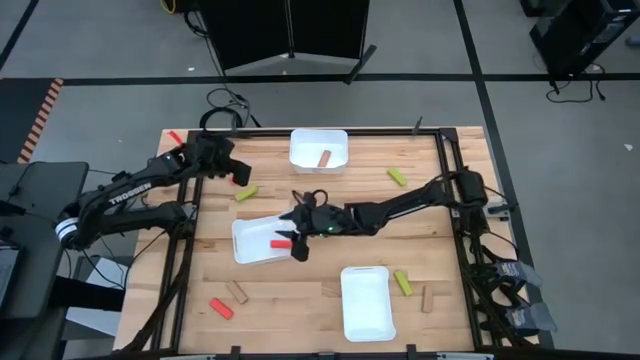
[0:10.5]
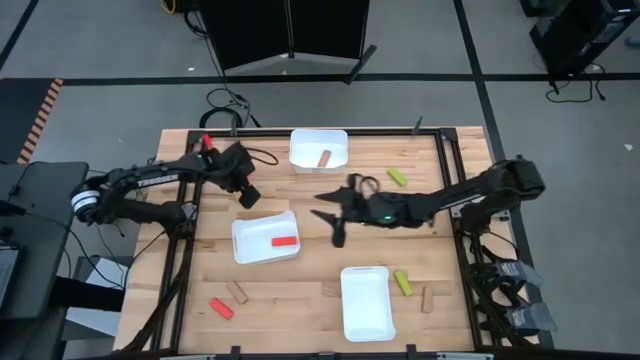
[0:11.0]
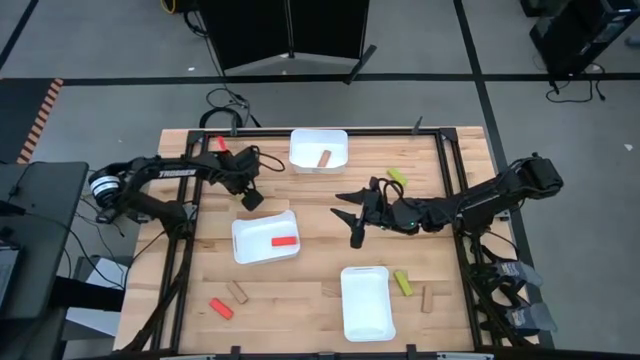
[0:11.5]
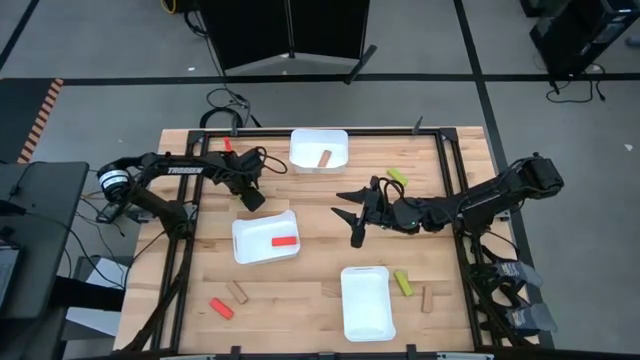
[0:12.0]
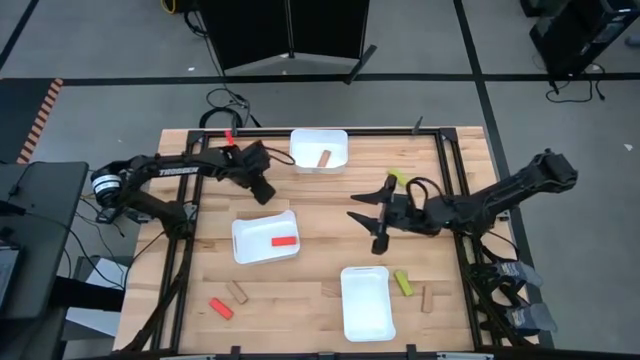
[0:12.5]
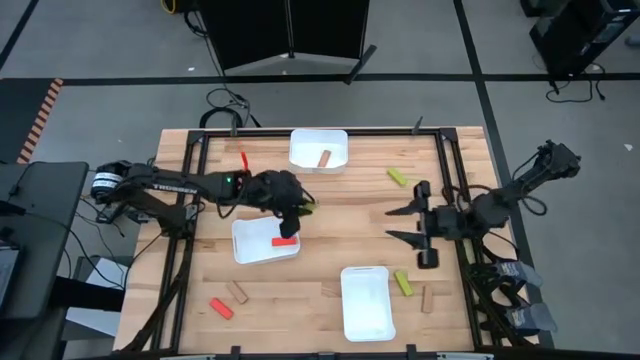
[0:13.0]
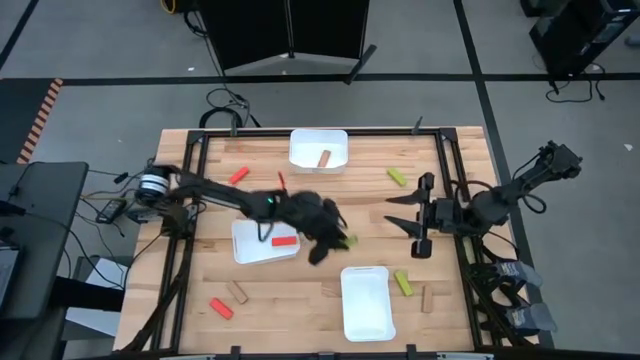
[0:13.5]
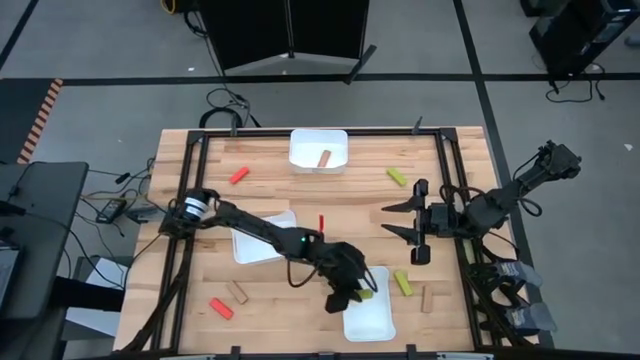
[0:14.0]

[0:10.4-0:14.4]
Task: Sort blocks
Put the top left yellow green block into the bottom white bin

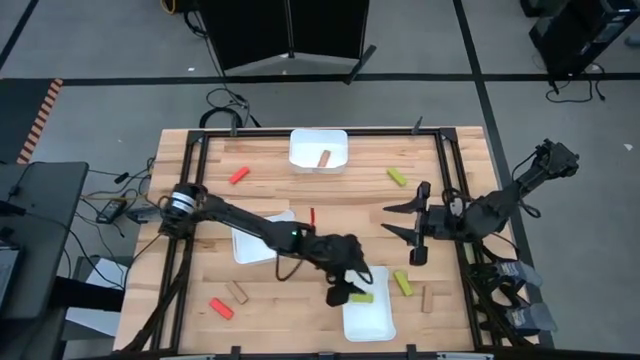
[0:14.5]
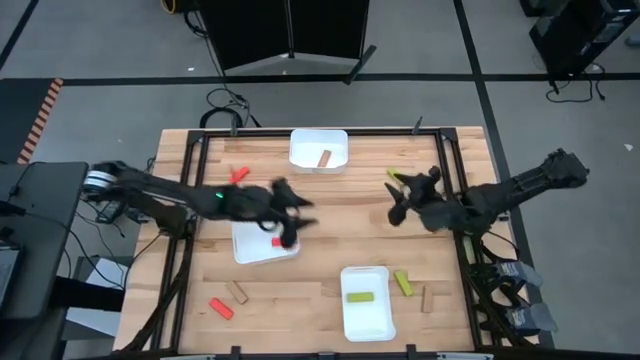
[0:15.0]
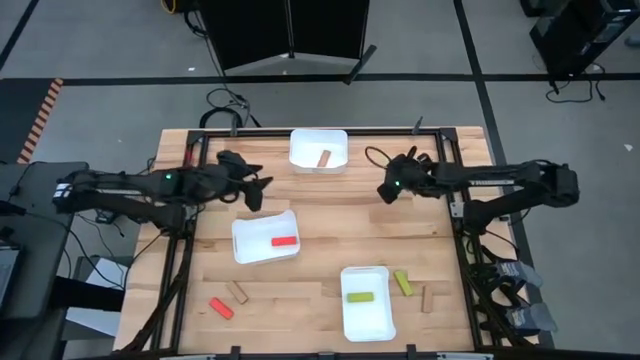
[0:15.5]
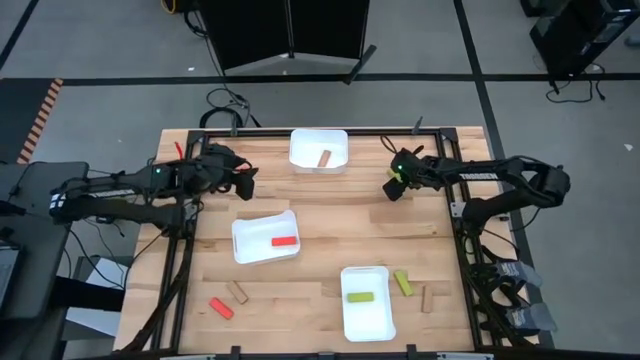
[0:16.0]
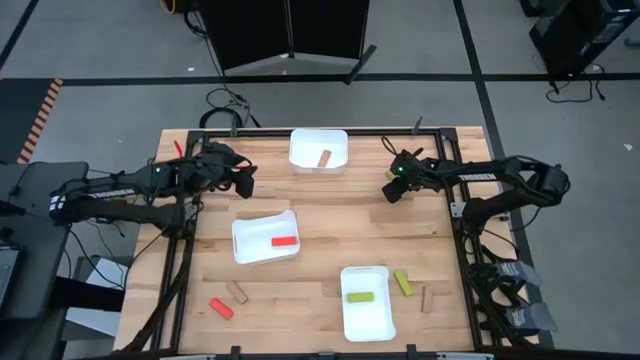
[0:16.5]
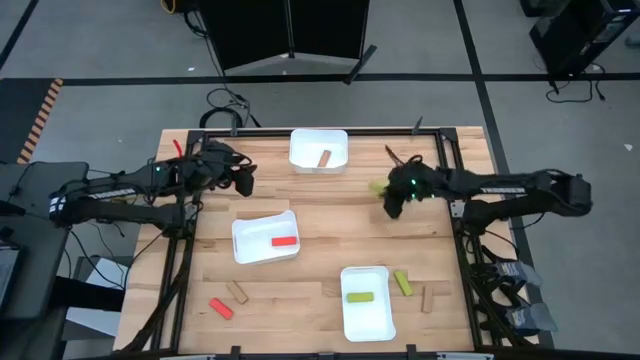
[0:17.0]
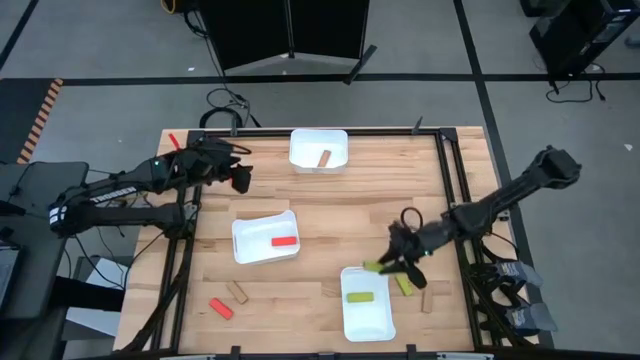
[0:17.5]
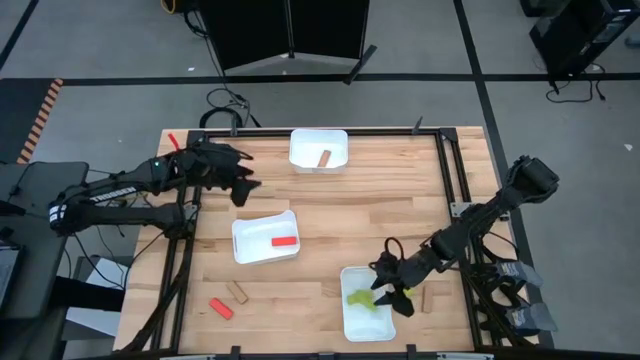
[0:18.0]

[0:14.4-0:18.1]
Put the top yellow green block into the bottom white bin

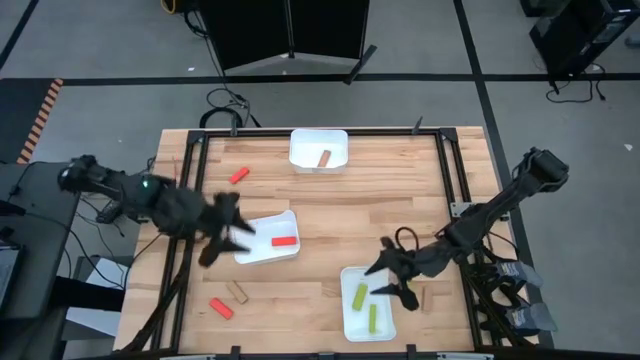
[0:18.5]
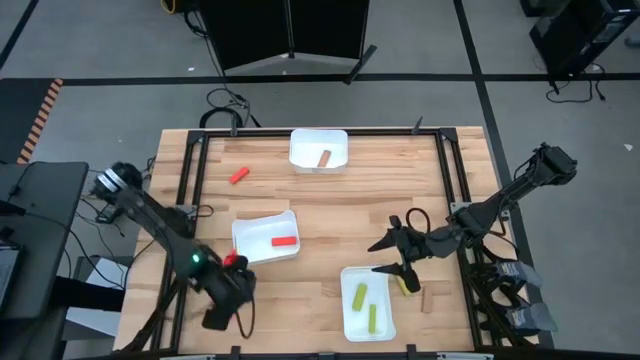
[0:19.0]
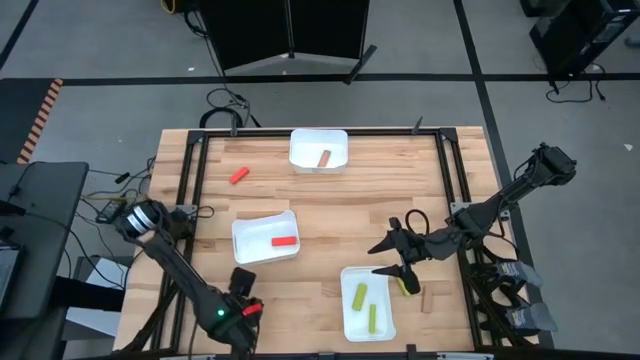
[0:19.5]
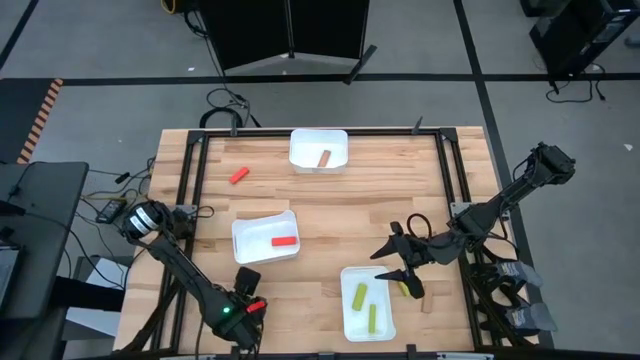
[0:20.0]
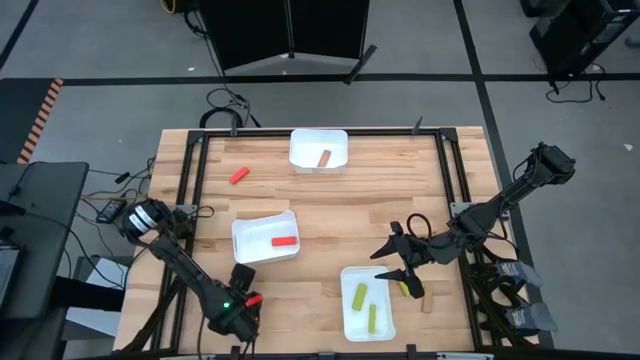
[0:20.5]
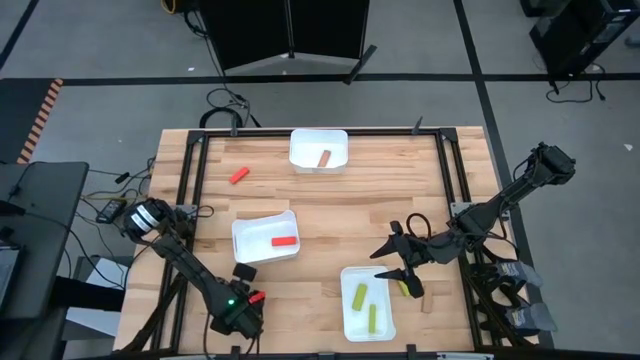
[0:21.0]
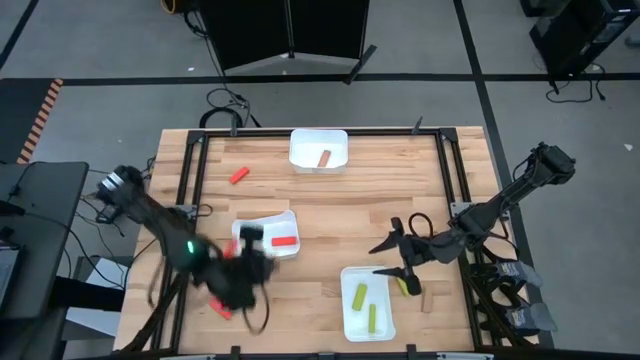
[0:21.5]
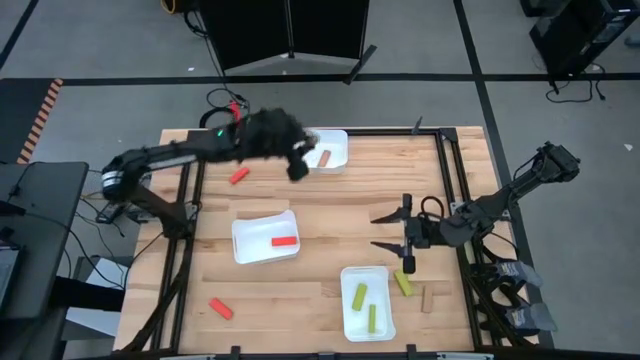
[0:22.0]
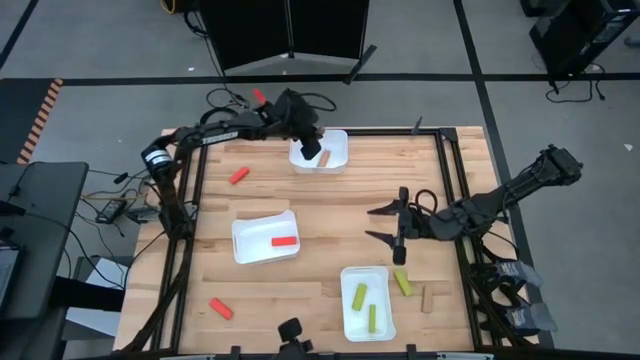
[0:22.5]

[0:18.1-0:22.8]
Put the left light brown block into the top white bin

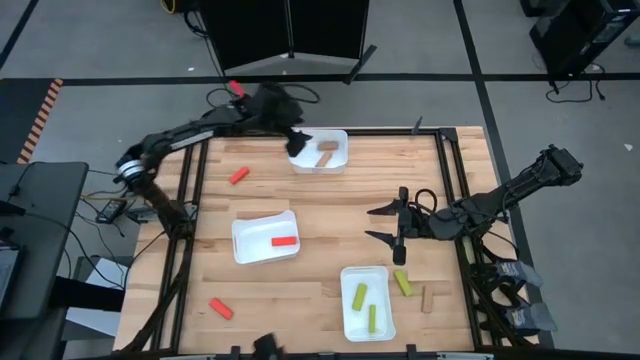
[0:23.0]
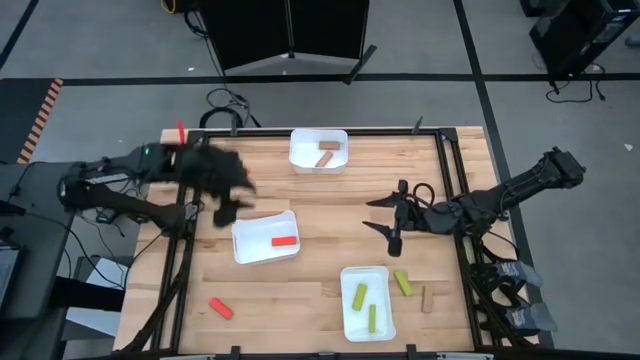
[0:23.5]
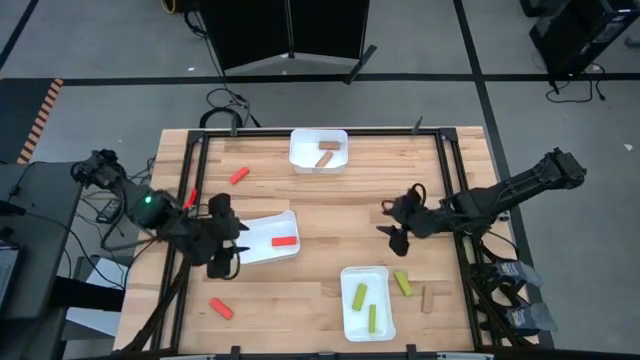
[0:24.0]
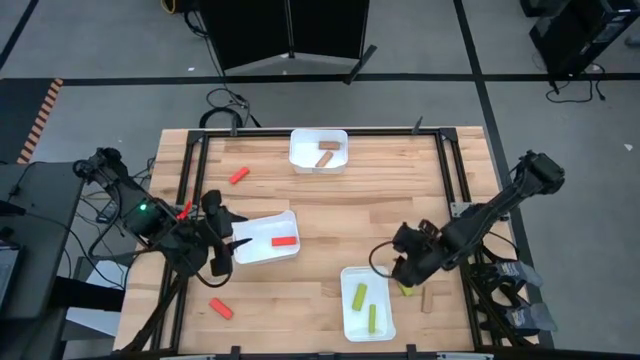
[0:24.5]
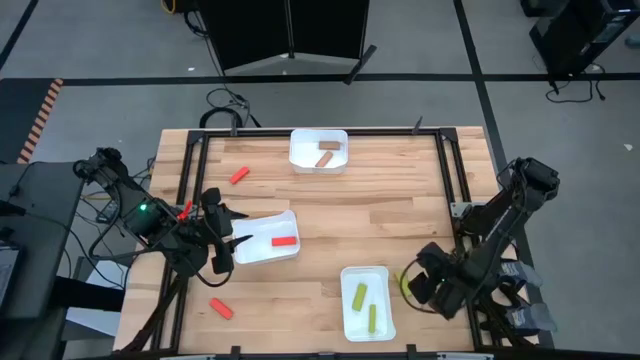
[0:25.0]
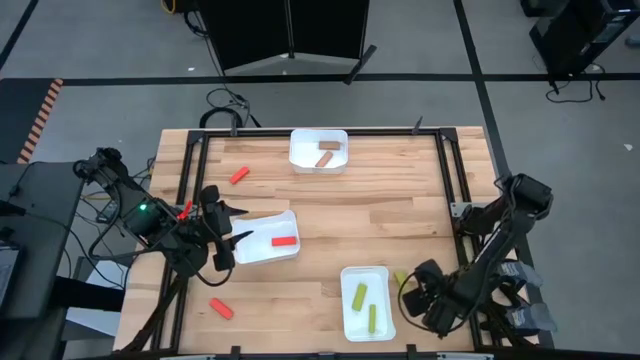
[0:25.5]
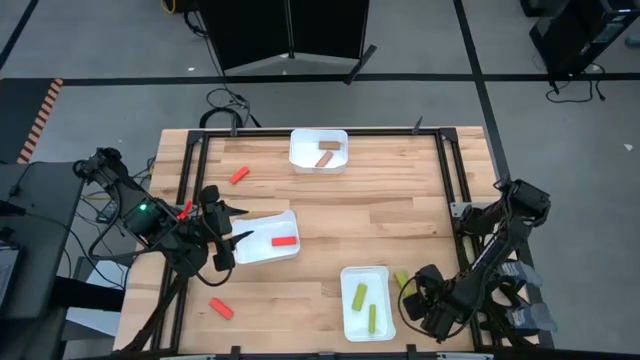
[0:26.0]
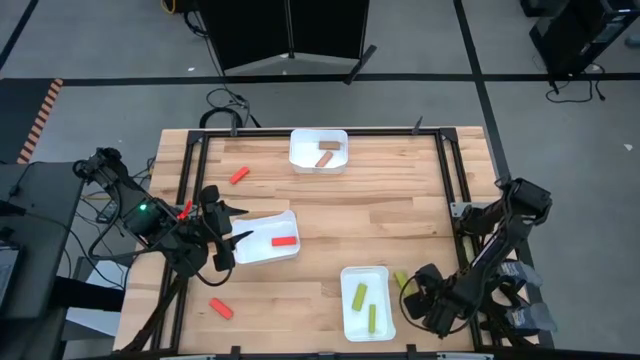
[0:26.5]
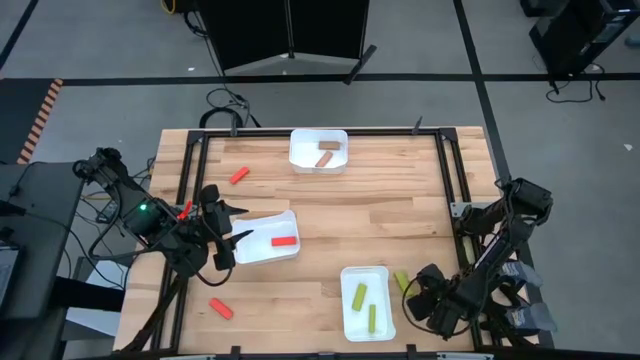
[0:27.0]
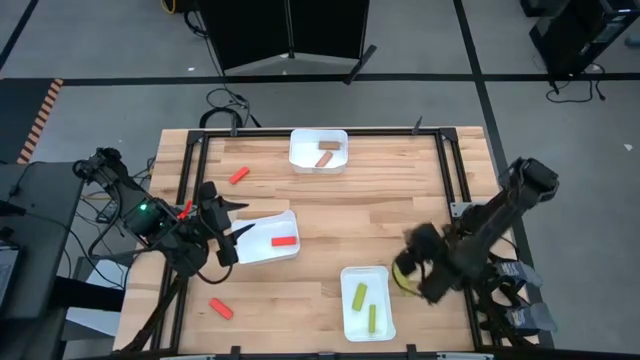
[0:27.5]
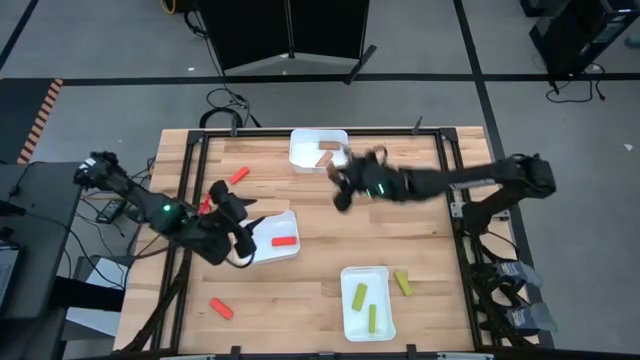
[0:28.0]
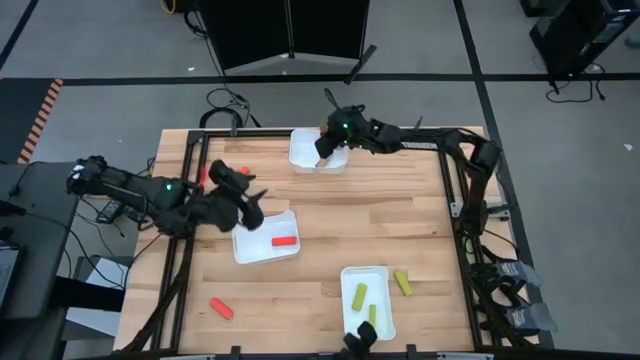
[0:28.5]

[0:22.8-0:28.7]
Put the light brown block into the top white bin

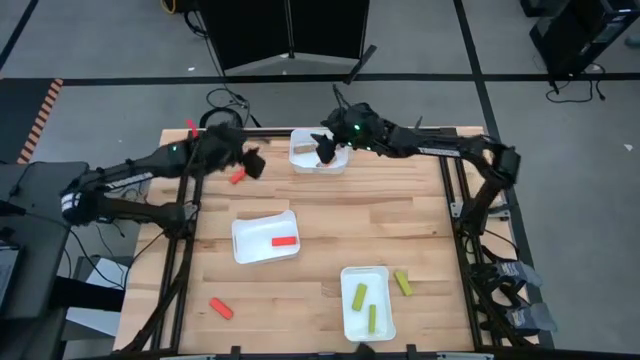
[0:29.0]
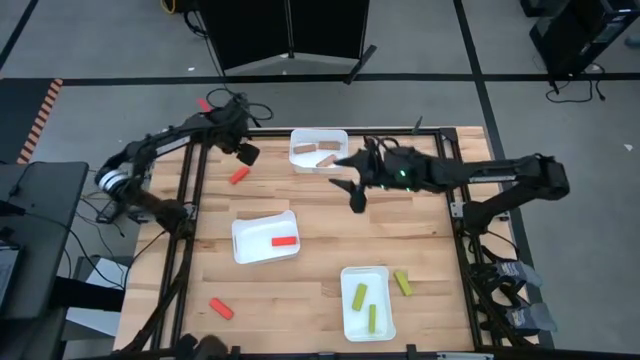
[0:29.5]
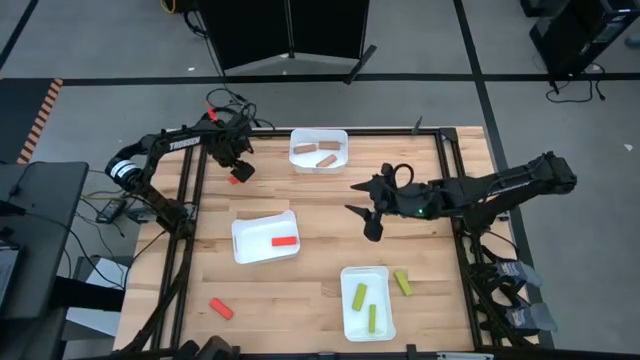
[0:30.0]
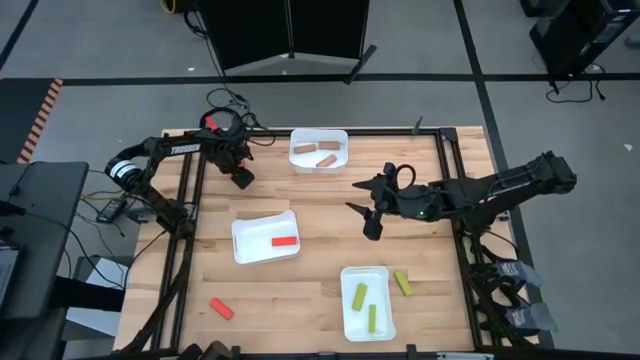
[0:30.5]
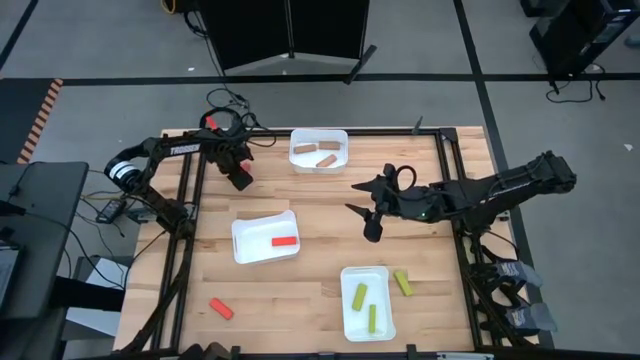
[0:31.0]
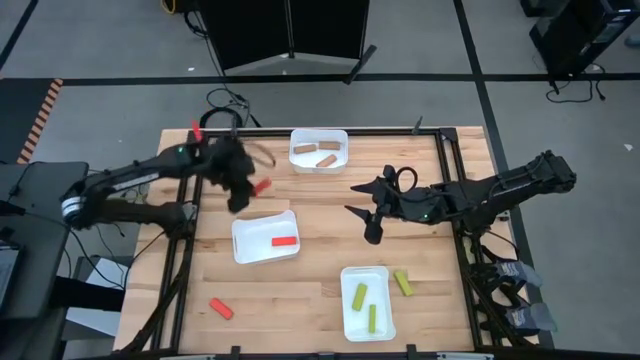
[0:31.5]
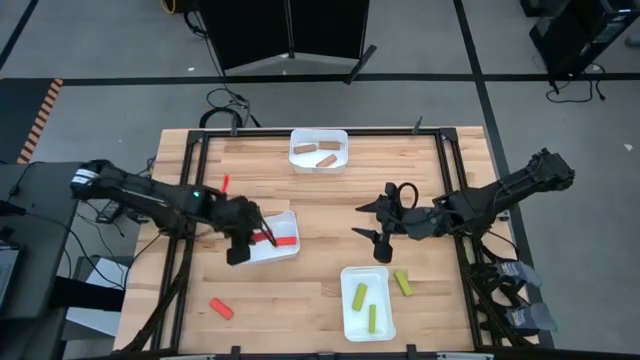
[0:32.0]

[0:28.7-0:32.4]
Put the top orange block into the middle white bin
